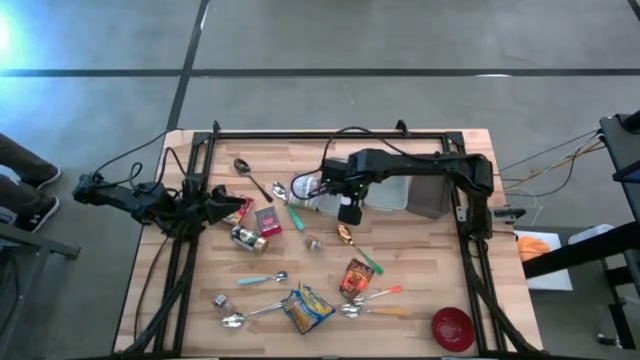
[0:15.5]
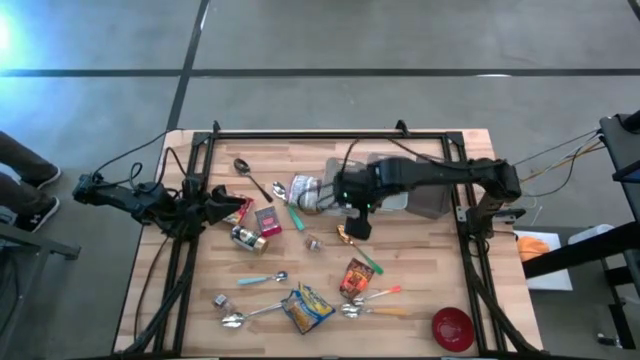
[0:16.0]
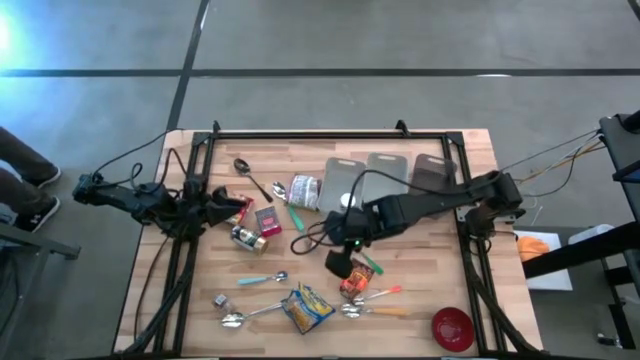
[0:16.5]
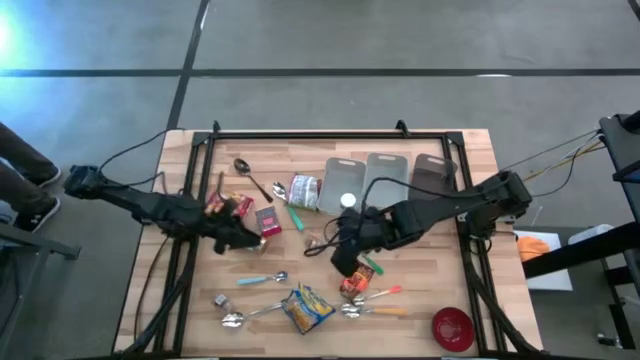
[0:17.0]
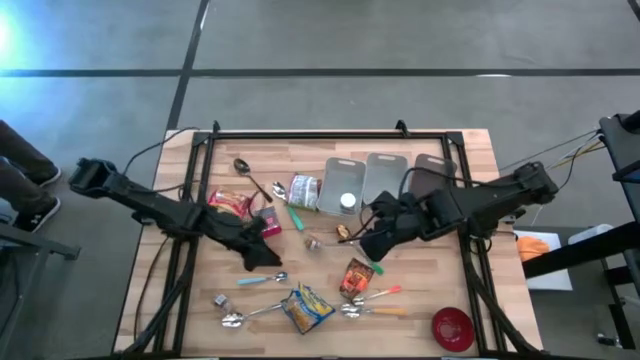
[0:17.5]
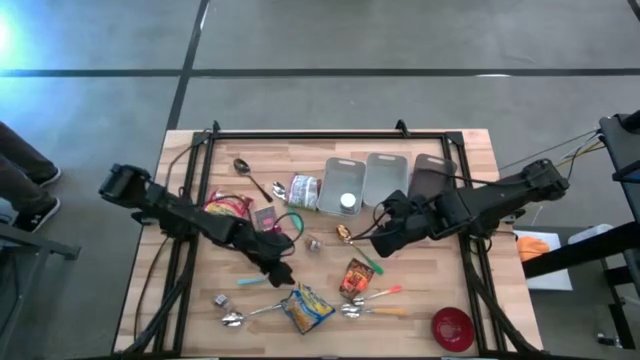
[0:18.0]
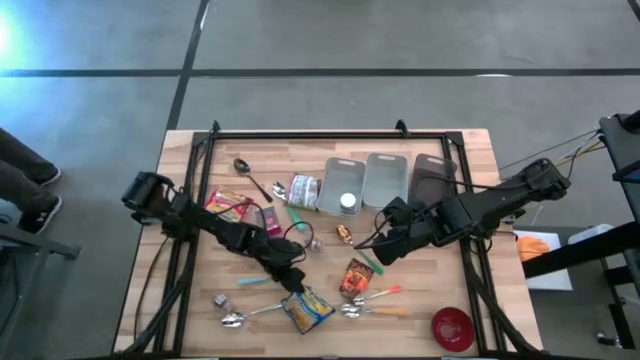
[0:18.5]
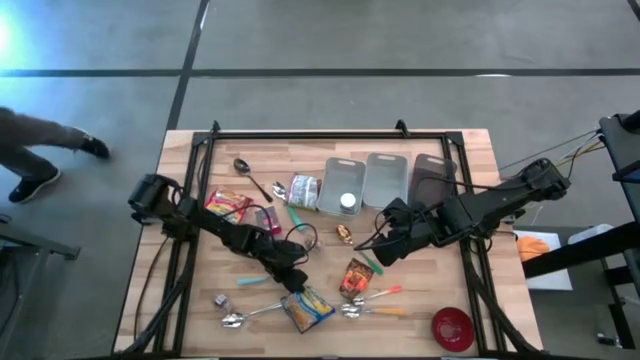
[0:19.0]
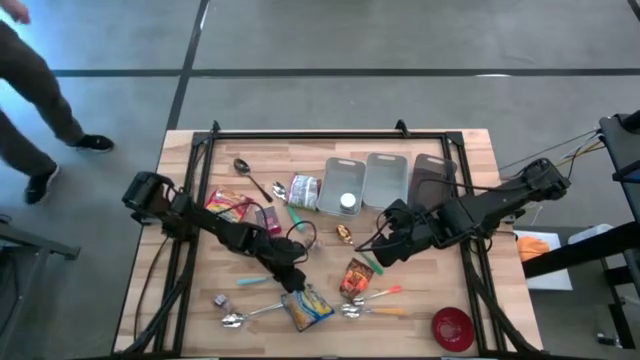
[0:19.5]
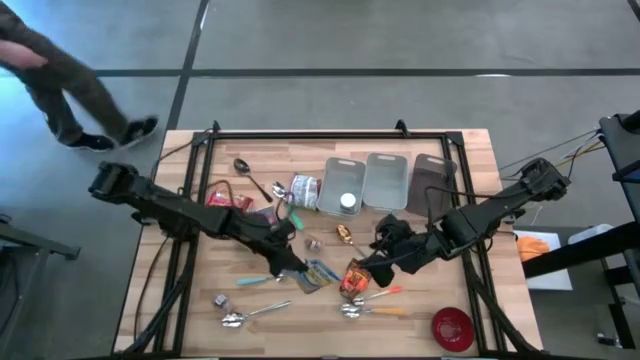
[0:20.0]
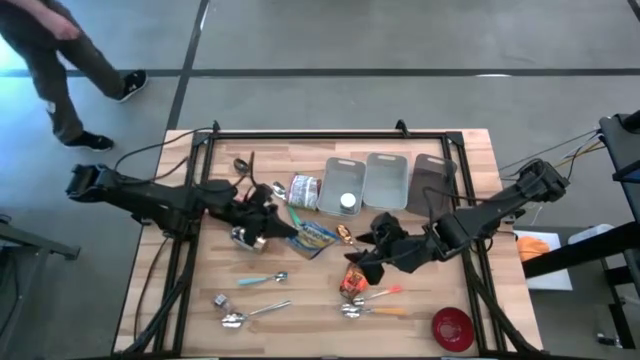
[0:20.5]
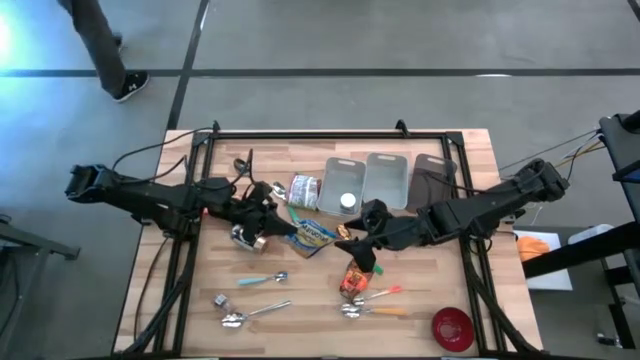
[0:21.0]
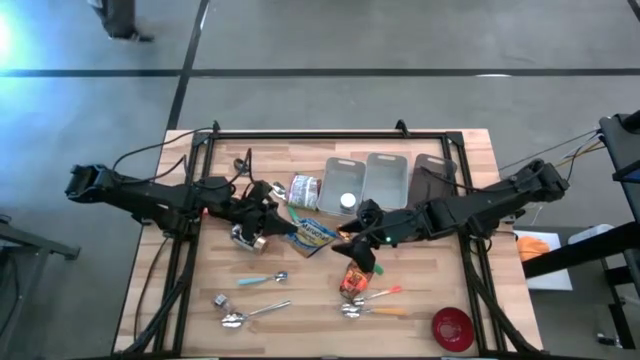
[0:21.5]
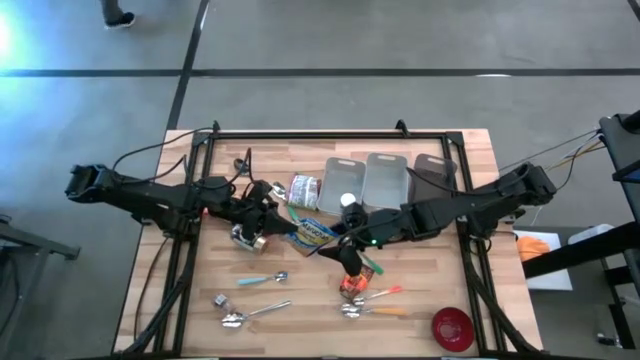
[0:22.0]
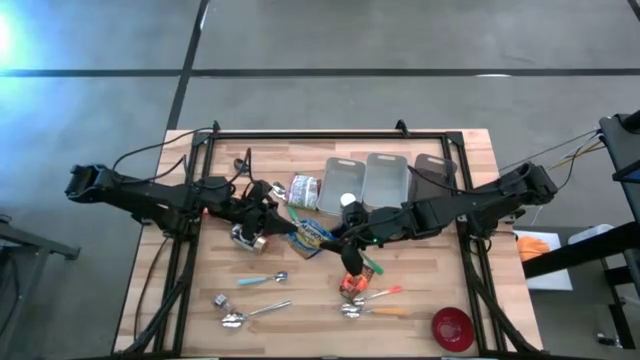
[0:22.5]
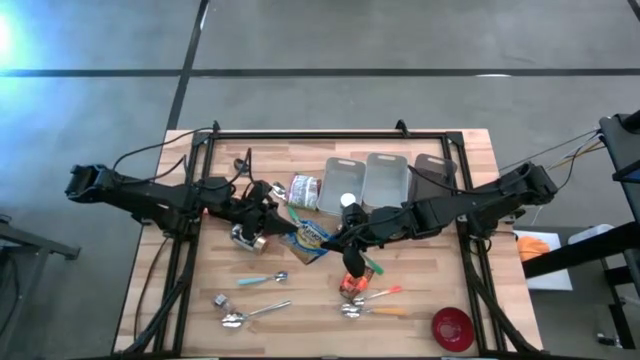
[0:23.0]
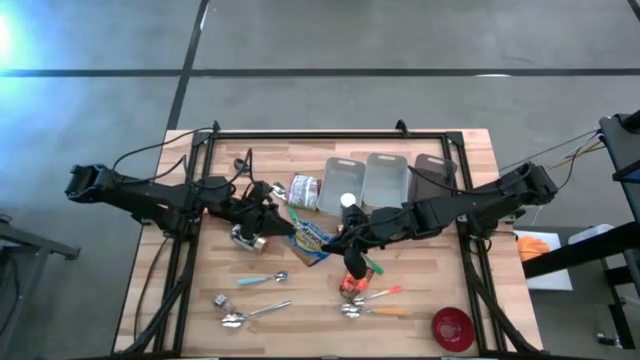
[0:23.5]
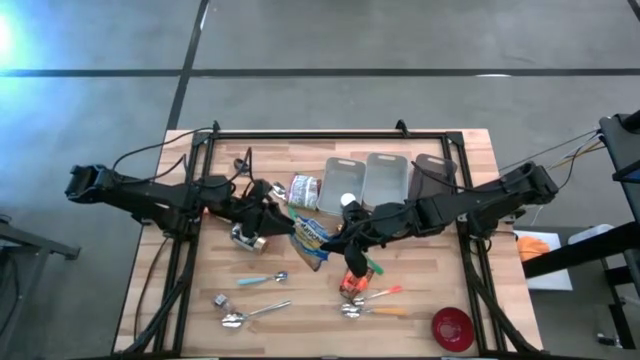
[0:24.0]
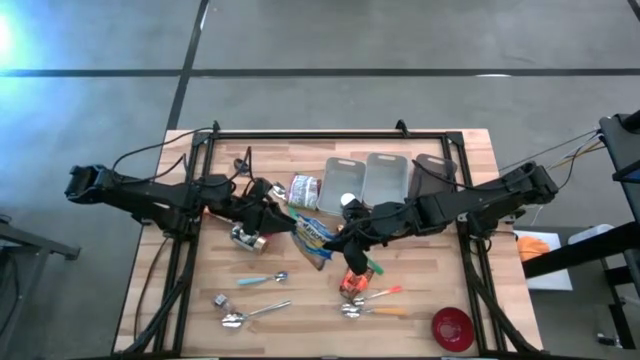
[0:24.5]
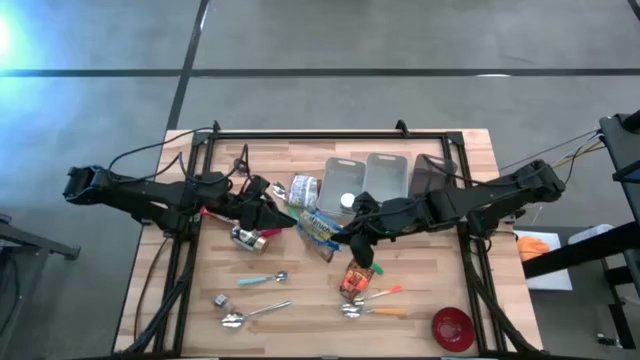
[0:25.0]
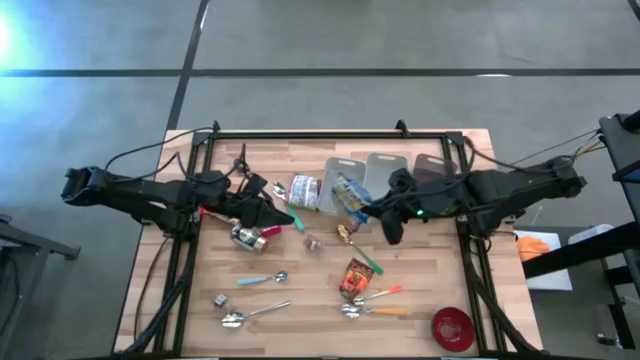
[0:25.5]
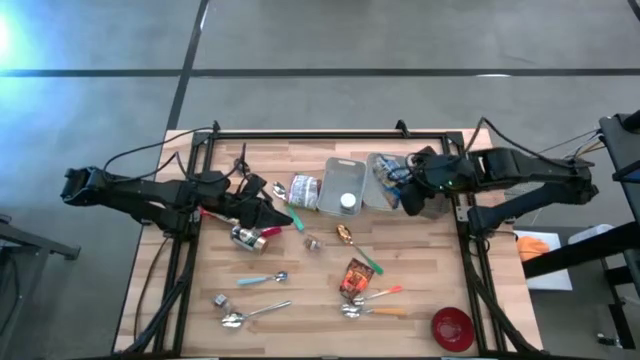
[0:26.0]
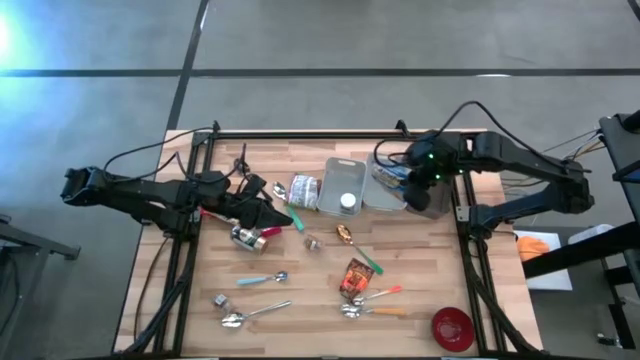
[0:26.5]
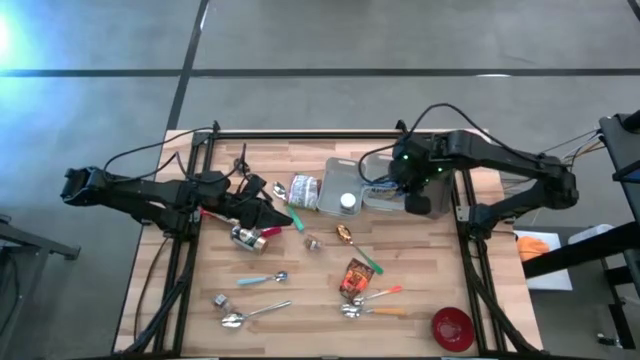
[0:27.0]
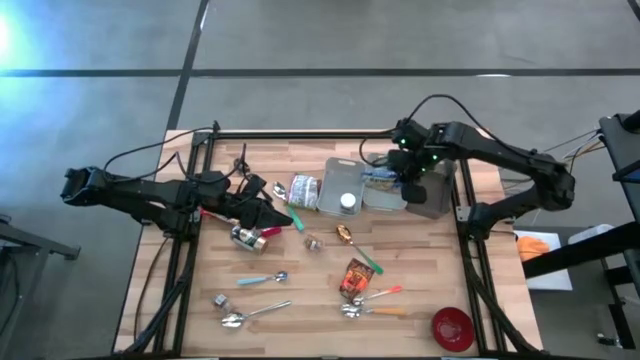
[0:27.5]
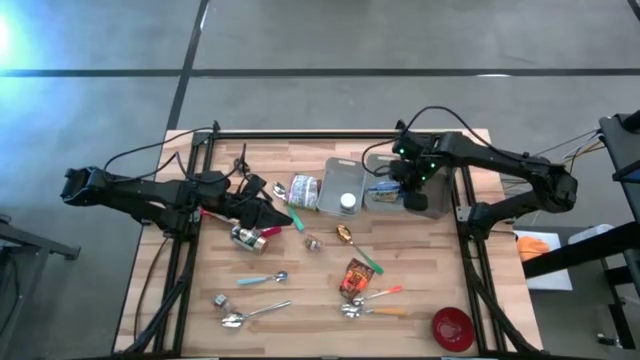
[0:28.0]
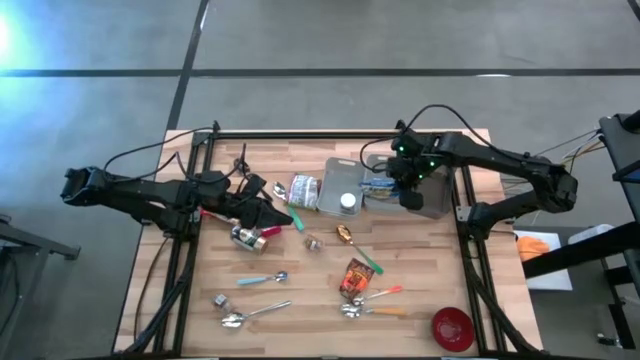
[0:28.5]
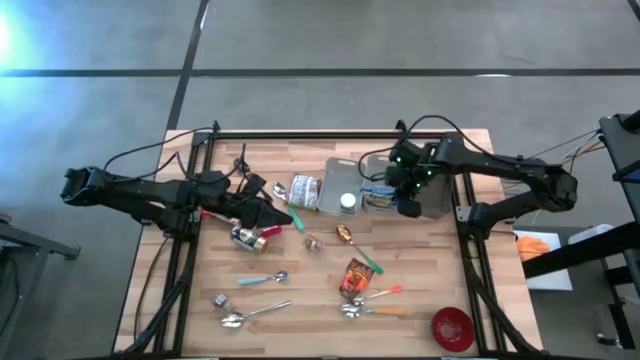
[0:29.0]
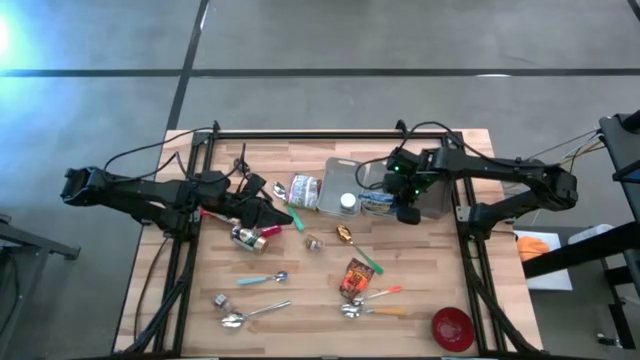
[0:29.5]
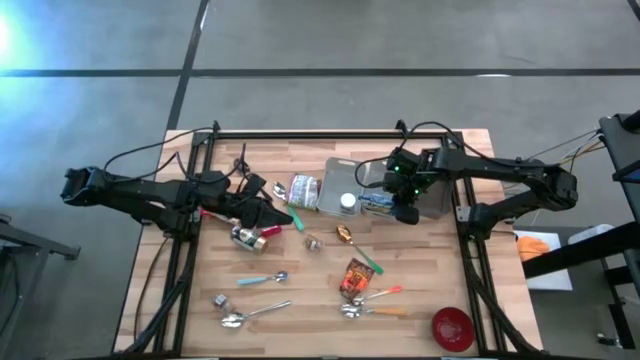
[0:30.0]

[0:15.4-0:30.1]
Put the blue noodle pack into the right gray bin

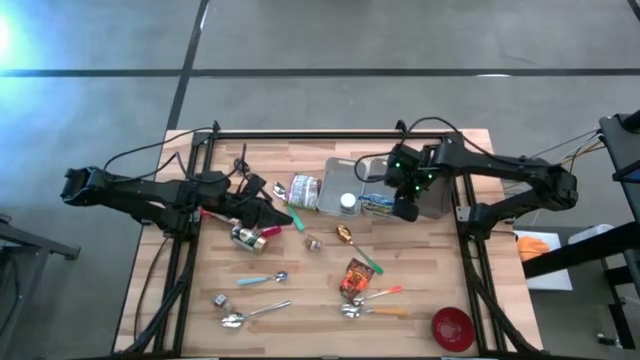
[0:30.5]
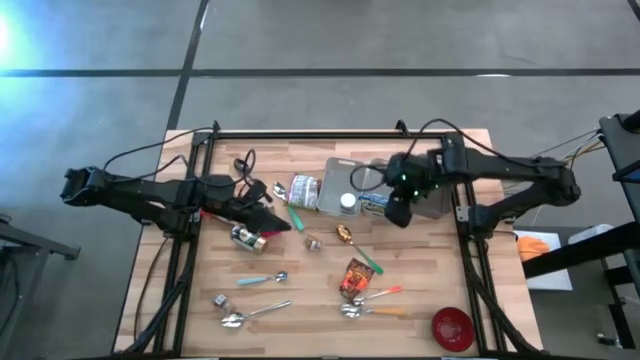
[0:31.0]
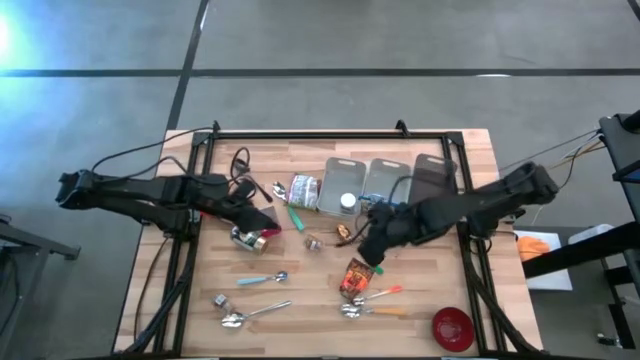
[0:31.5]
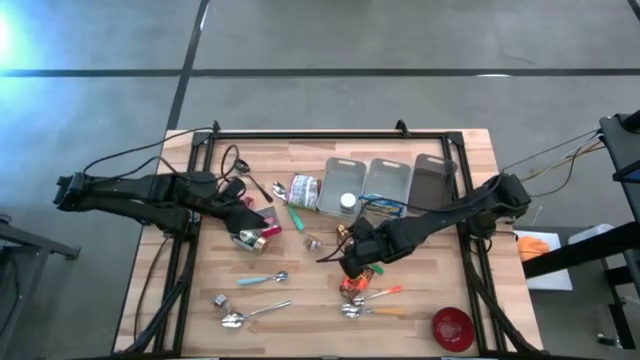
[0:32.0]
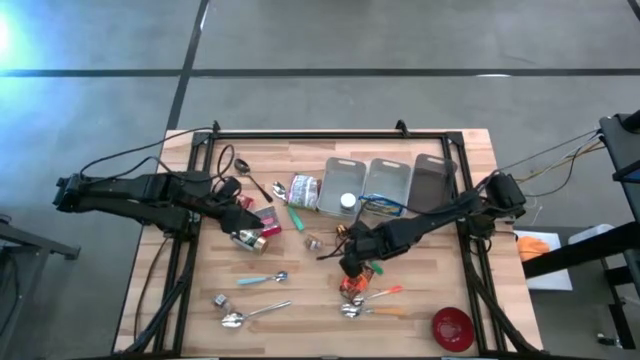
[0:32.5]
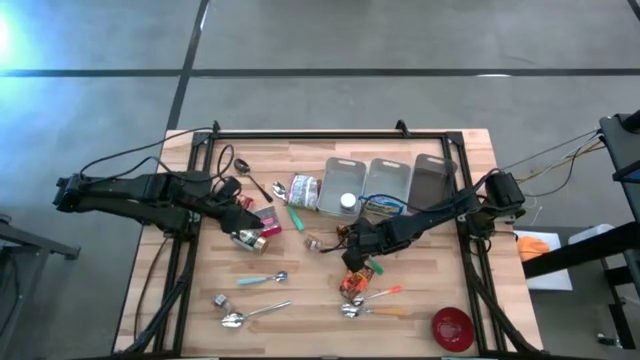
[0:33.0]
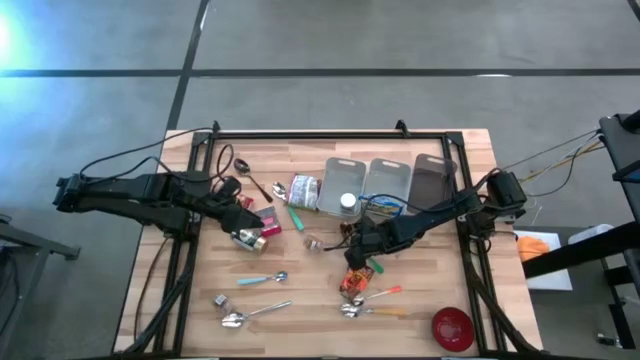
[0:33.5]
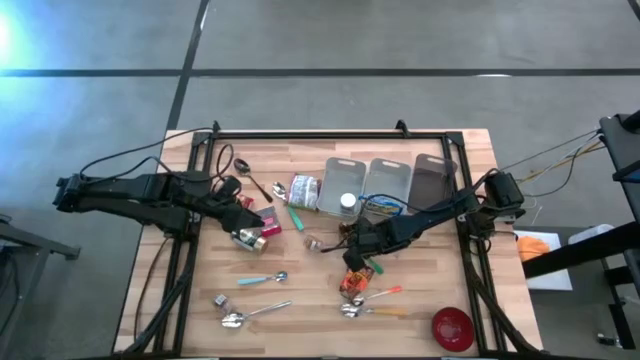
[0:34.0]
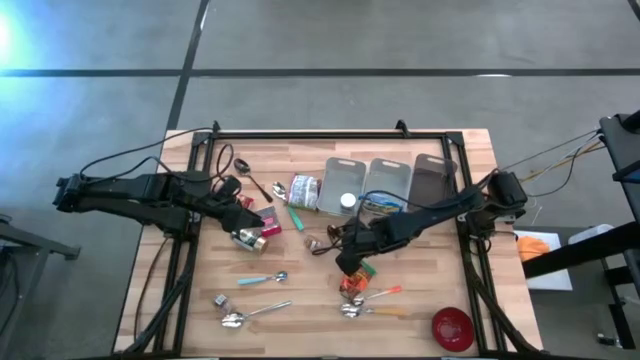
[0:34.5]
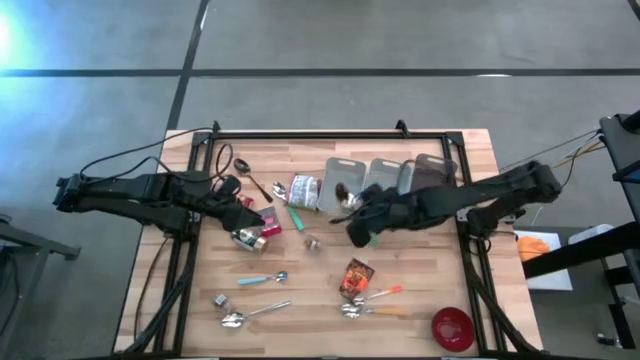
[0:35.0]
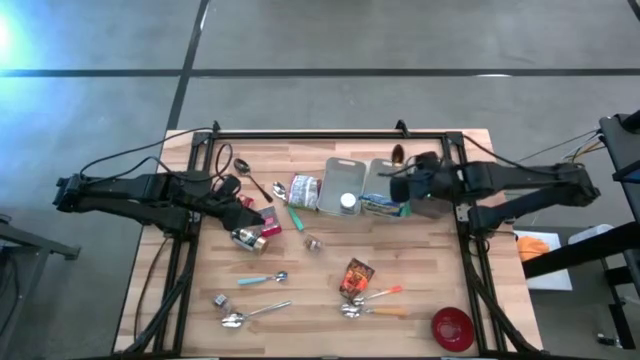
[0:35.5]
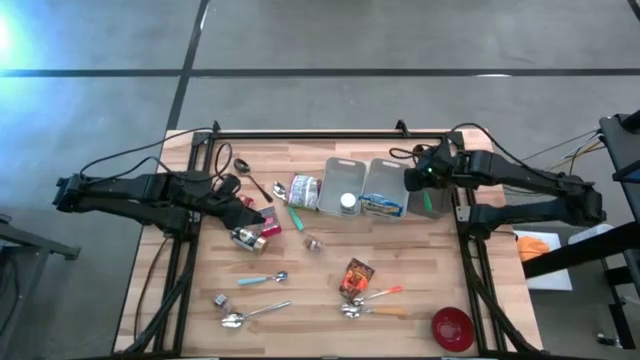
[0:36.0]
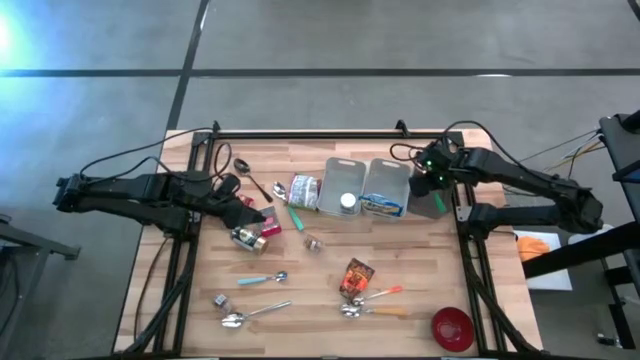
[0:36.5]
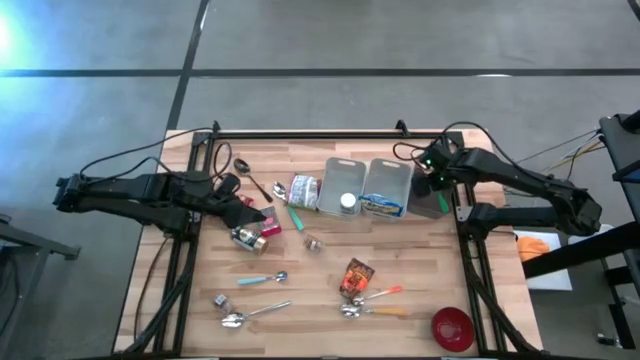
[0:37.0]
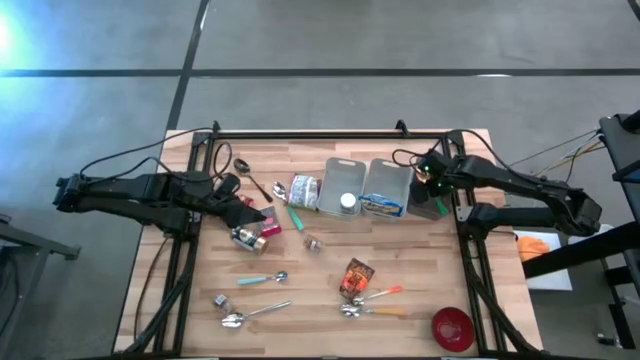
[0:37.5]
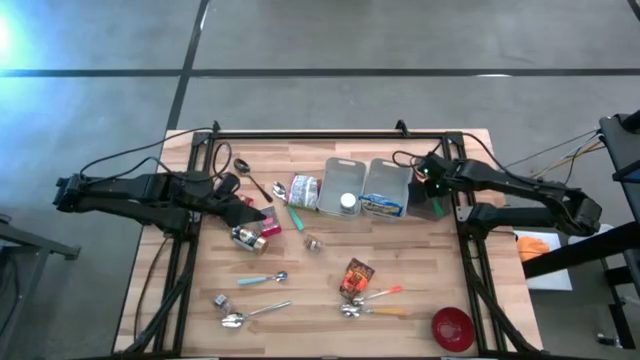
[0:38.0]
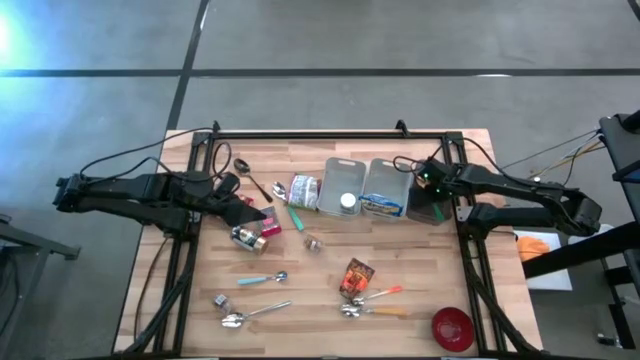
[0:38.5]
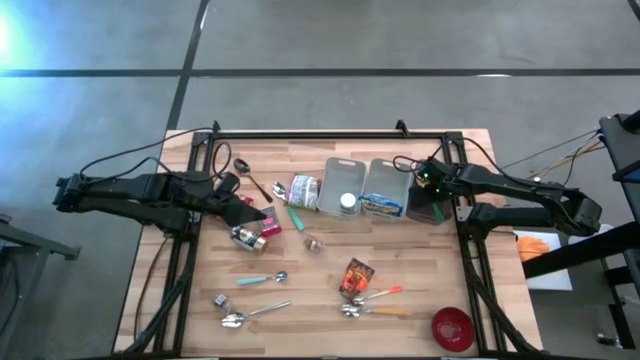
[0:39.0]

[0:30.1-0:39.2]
Put the green spoon into the black bin
